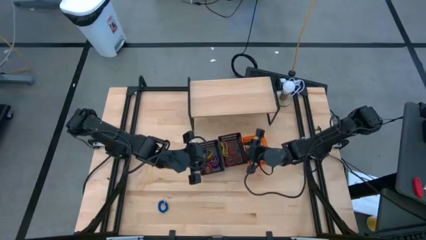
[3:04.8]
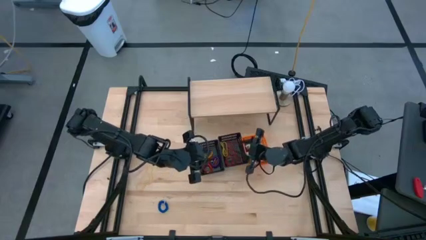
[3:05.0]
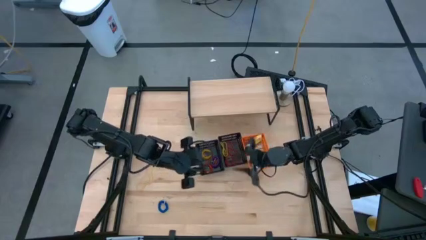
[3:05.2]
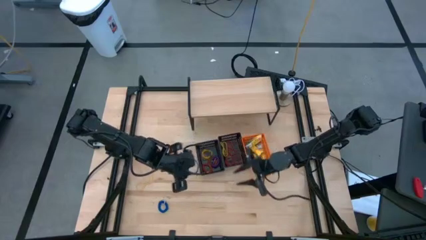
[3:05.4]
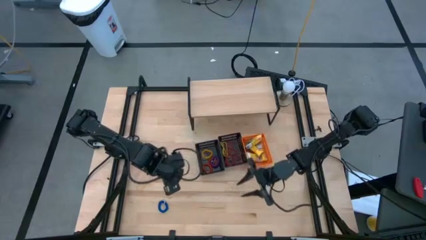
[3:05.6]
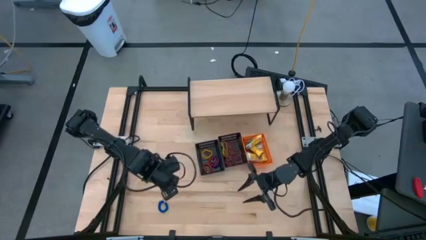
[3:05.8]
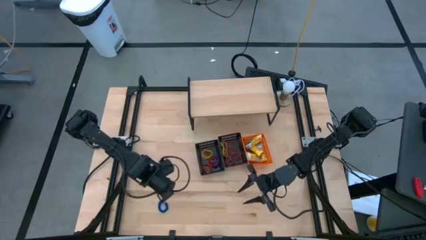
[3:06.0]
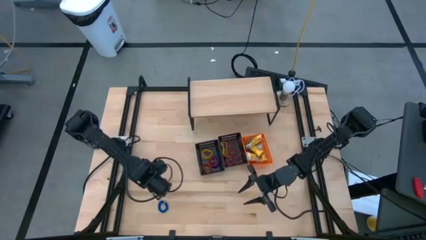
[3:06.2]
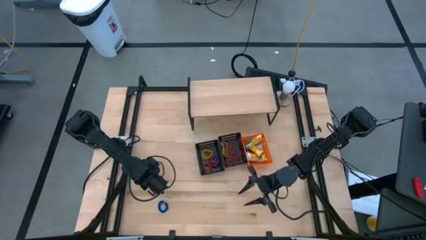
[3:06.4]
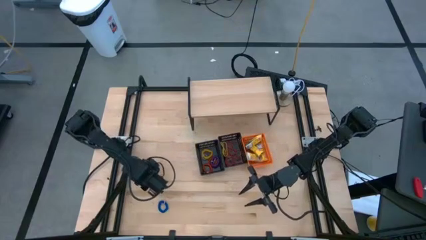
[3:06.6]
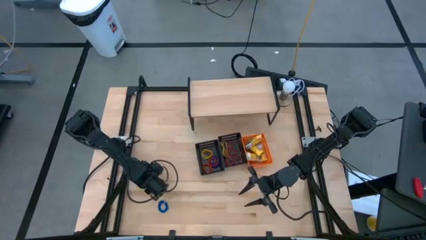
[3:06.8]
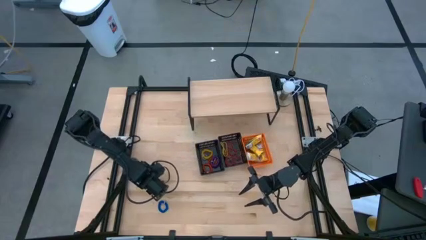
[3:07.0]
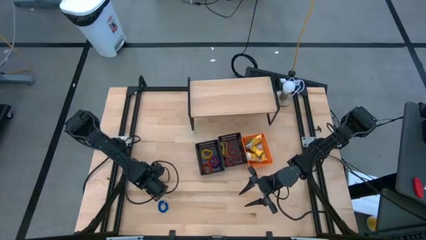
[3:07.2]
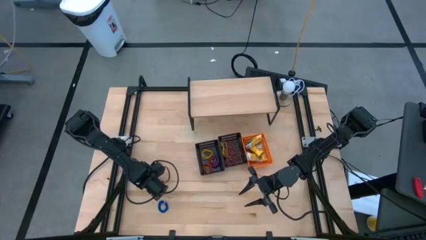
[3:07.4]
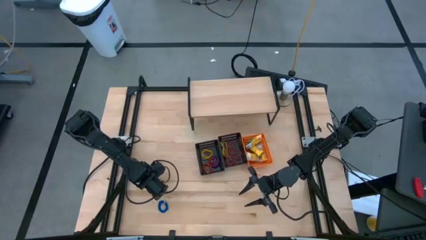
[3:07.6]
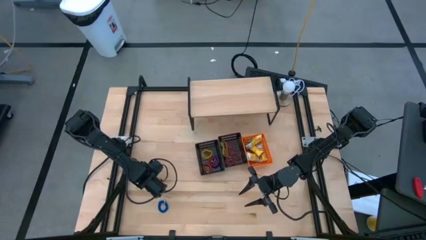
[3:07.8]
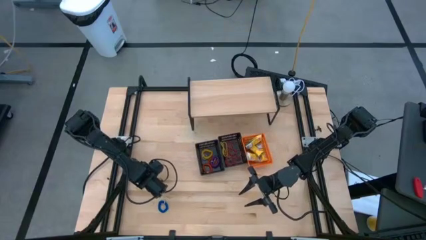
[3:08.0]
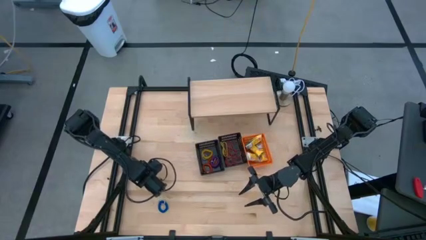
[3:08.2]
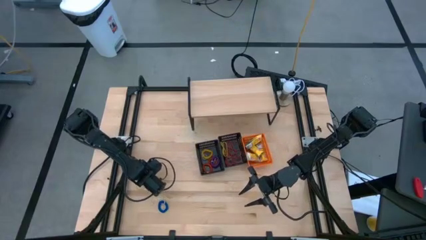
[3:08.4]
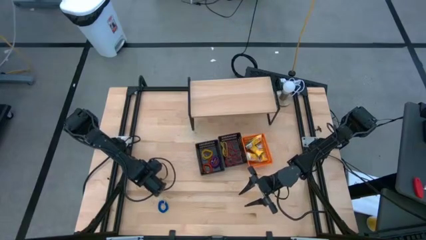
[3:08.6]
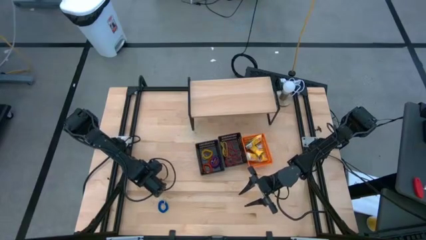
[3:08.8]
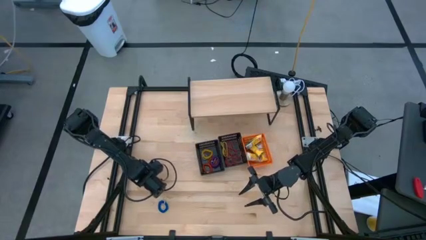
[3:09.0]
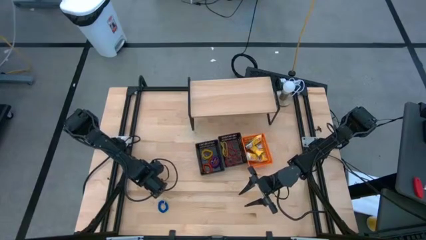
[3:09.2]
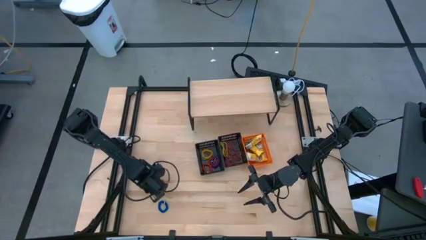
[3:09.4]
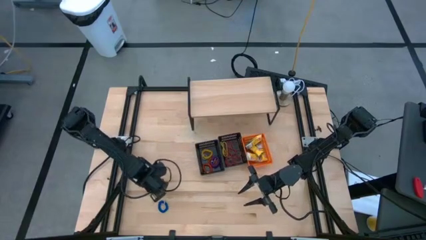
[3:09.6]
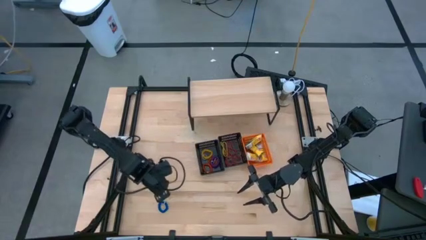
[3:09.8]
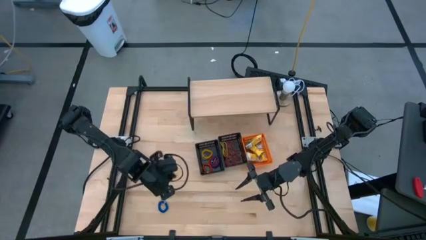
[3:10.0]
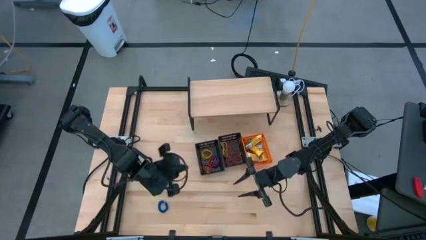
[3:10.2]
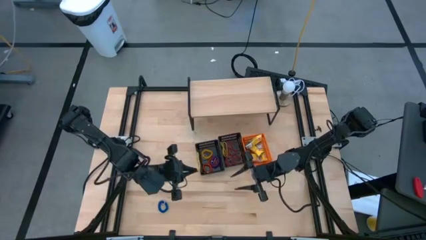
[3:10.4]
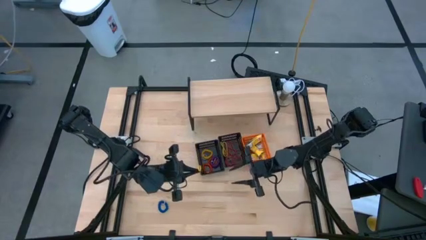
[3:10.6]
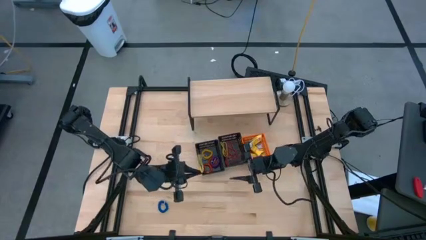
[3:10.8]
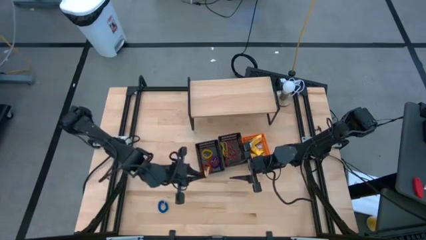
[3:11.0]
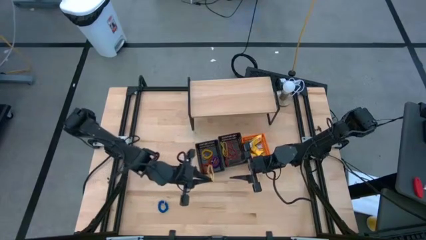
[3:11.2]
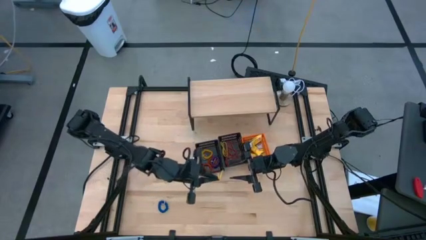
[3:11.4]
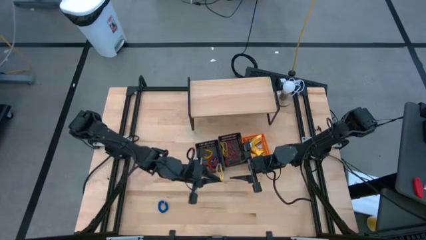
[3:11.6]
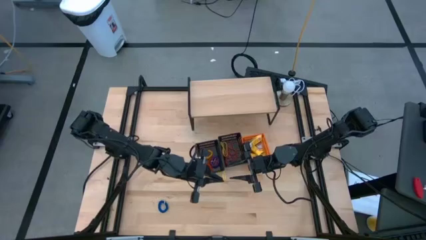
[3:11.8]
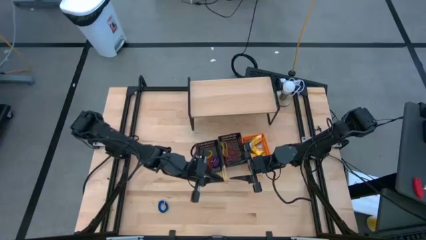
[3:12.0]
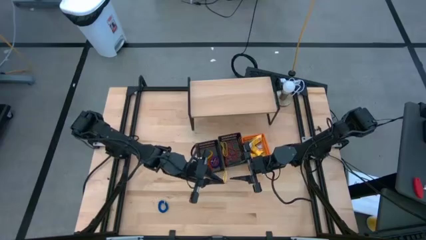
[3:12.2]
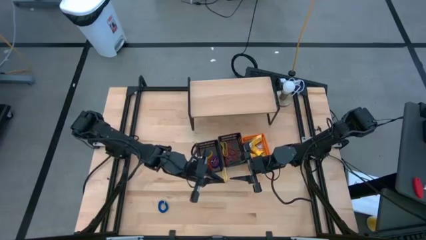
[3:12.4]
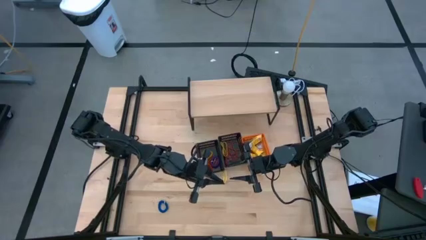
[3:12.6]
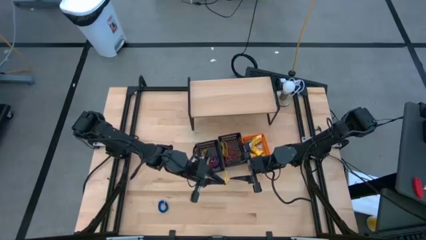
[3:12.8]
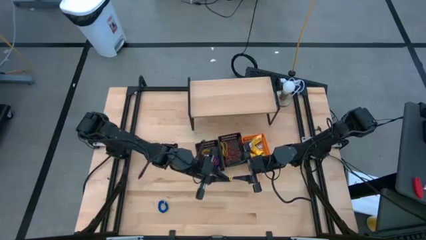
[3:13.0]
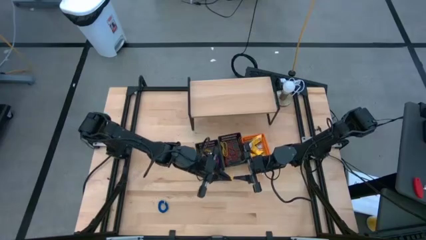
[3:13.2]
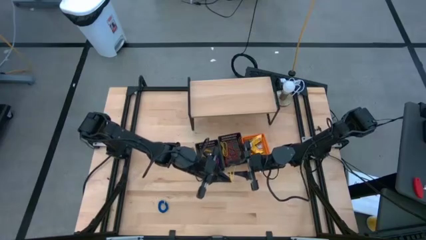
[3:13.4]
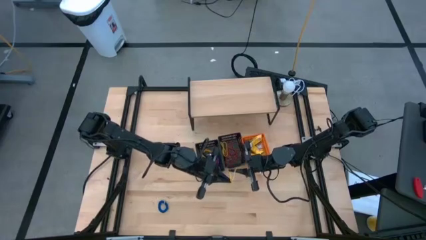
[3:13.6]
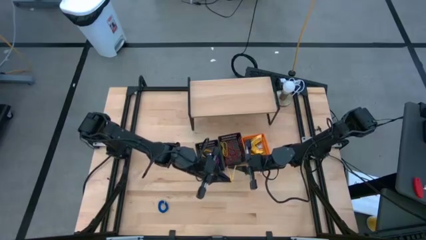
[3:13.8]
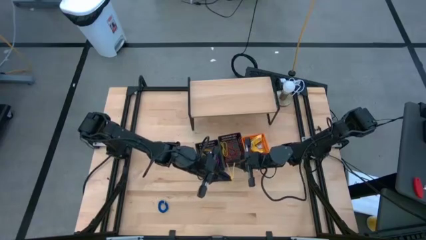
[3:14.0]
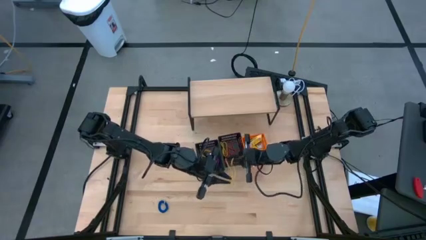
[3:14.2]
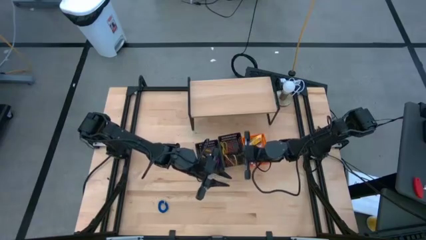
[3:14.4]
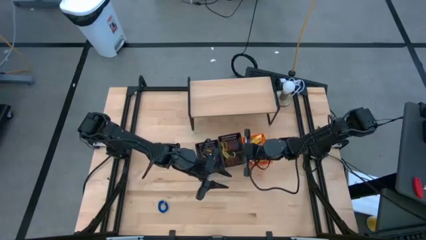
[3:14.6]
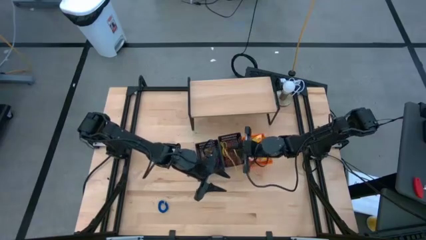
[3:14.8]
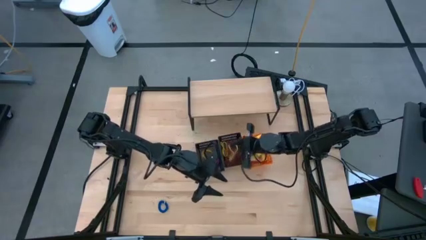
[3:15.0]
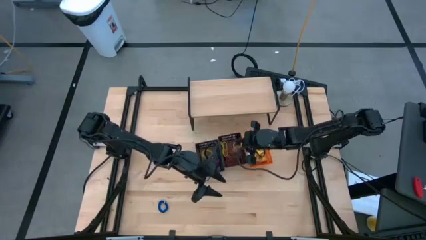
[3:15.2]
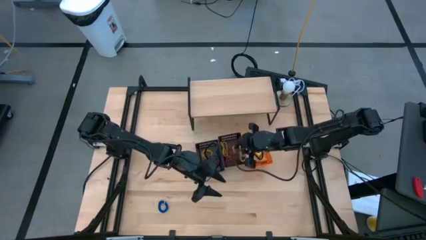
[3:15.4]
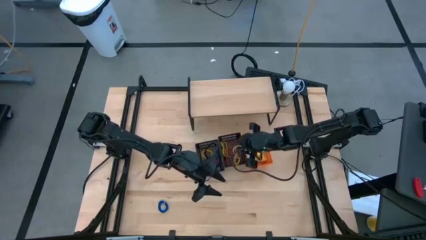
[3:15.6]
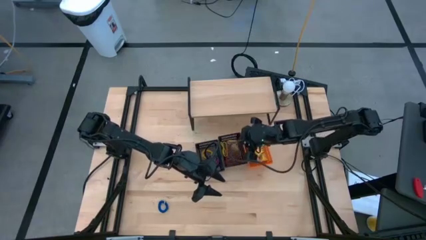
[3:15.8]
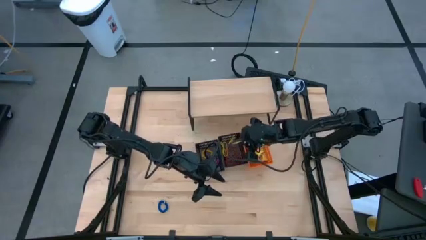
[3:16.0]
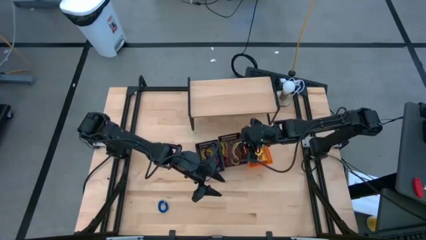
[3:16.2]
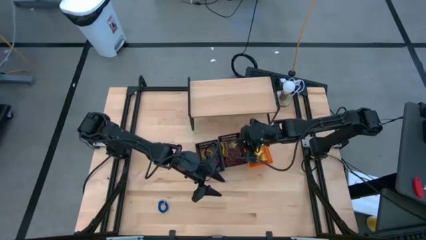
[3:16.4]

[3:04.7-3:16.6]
Task: Pick & Place Office Desk Supplies
Put the yellow rubber band into the right black bin

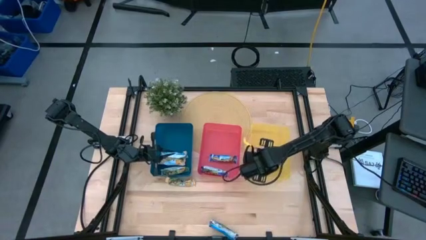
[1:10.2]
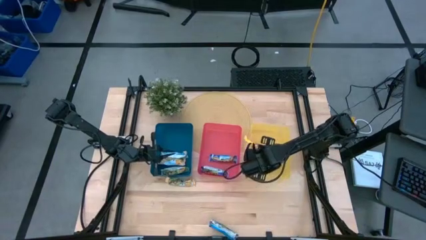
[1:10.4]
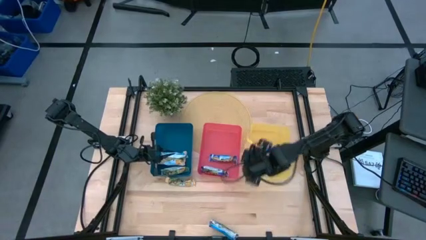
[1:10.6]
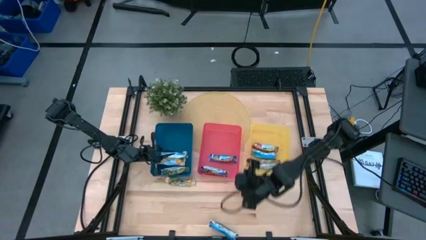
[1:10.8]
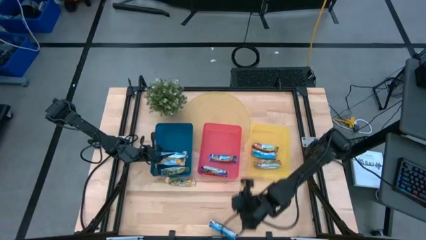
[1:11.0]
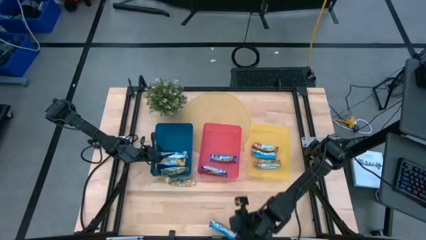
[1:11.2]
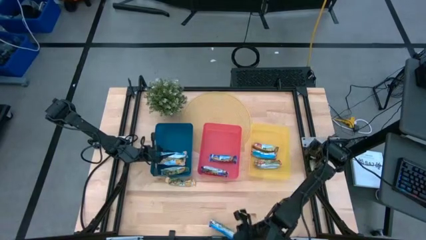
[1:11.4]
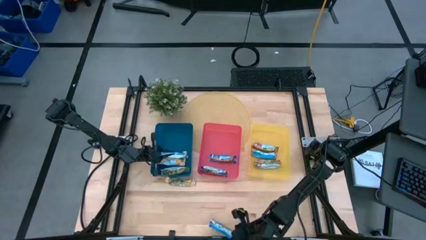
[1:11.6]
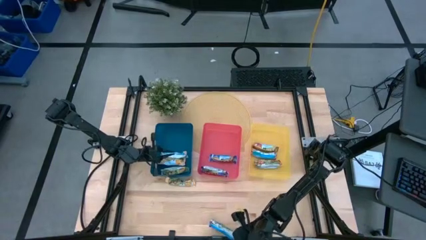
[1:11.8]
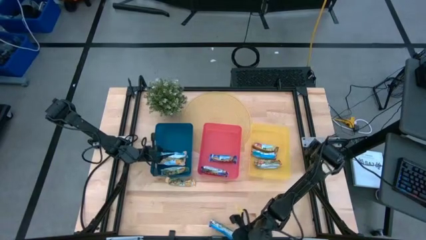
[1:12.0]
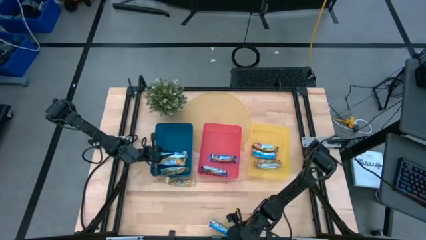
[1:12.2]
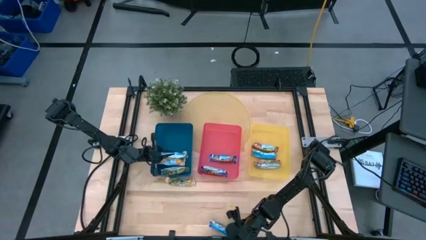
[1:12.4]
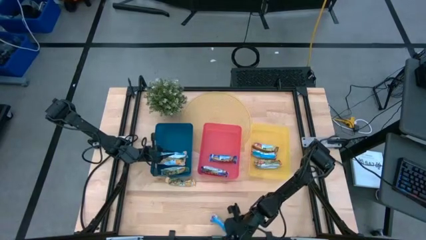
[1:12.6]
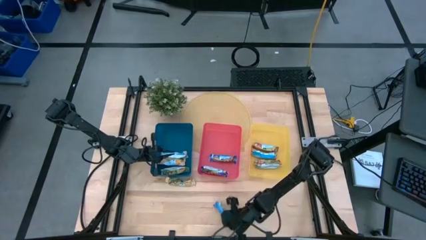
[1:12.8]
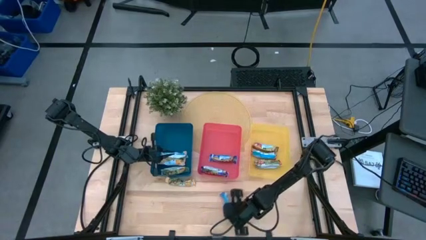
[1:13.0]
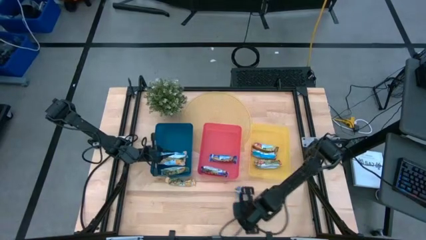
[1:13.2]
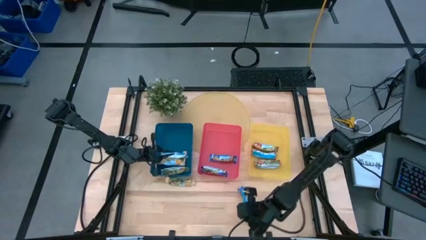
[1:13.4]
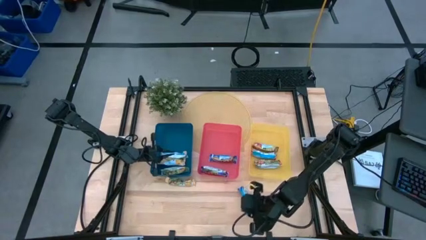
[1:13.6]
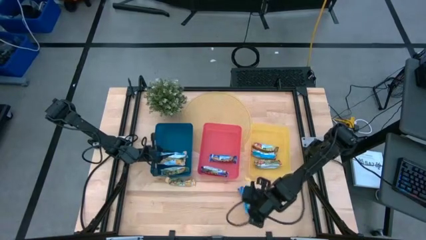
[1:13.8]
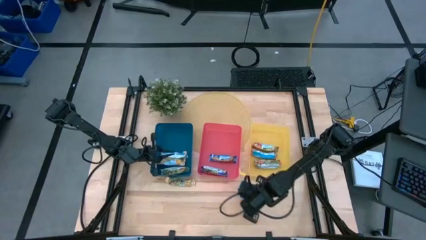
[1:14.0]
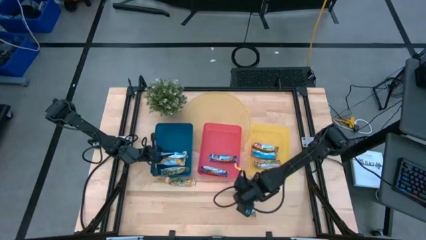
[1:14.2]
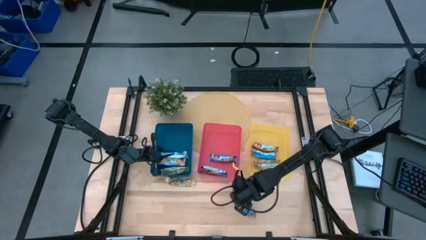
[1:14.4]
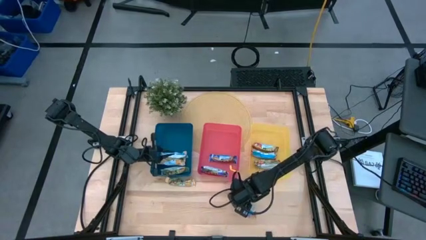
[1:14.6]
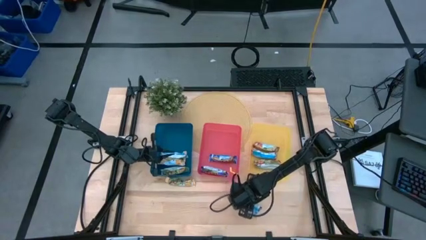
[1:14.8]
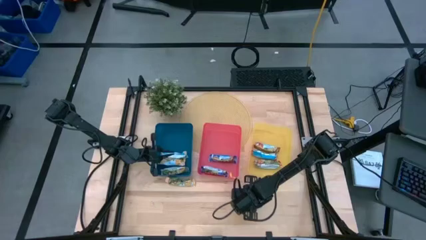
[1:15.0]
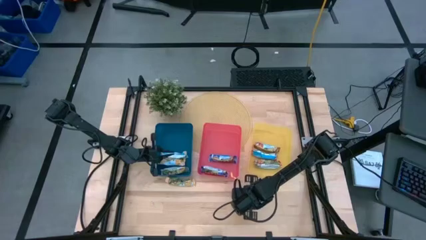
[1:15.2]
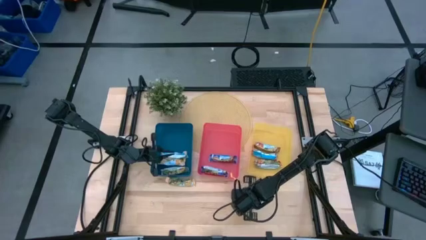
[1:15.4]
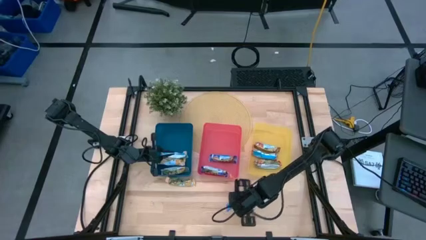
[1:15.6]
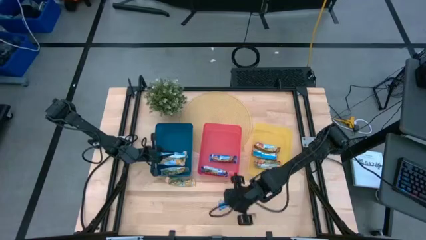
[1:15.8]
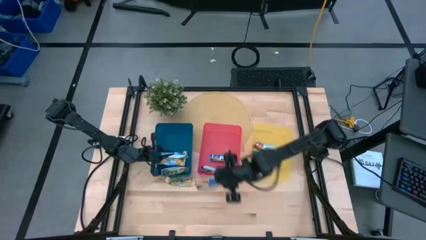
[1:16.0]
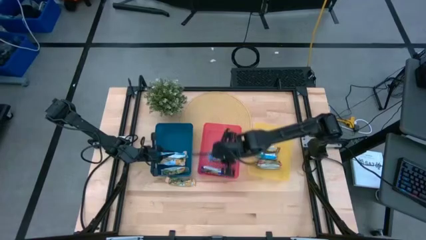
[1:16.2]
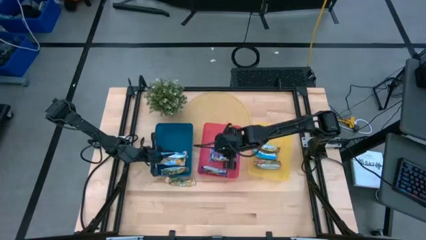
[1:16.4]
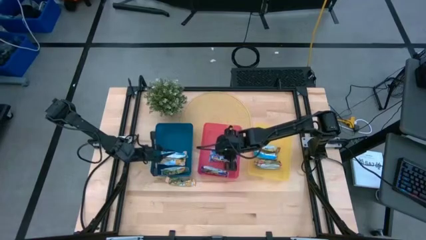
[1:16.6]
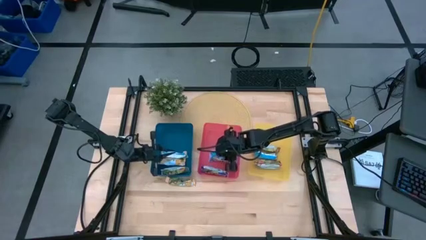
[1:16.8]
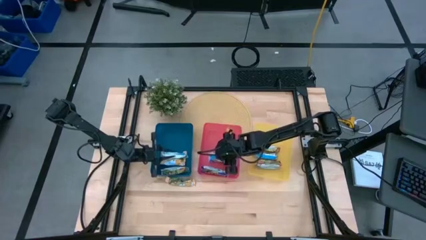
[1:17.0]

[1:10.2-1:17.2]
Task: Pick and place Granola Bars by type
Put the blue granola bar into the red bin
